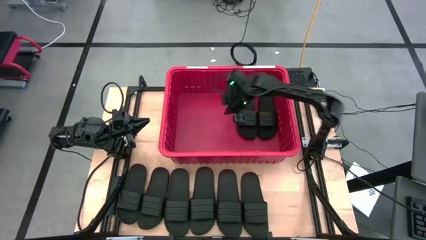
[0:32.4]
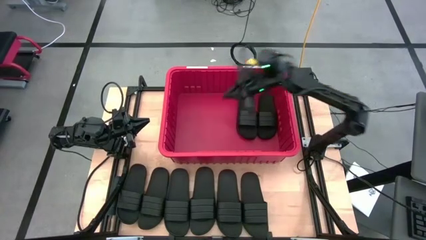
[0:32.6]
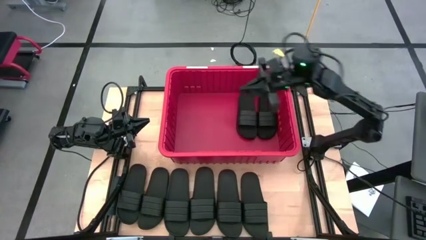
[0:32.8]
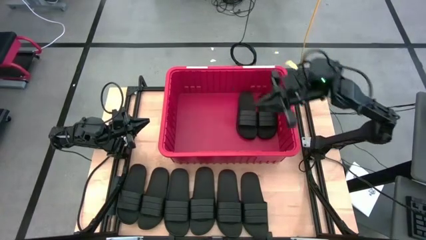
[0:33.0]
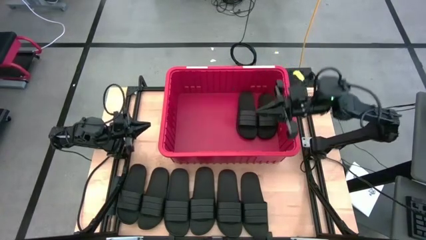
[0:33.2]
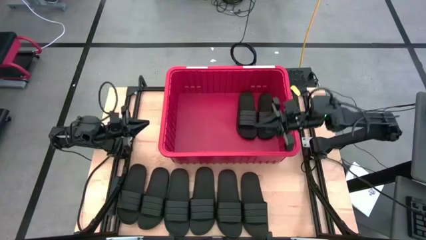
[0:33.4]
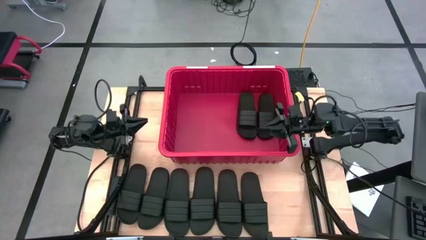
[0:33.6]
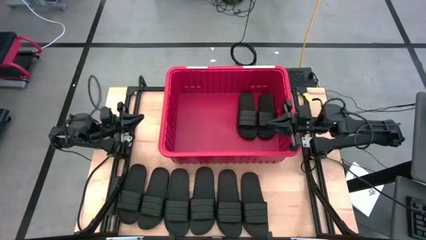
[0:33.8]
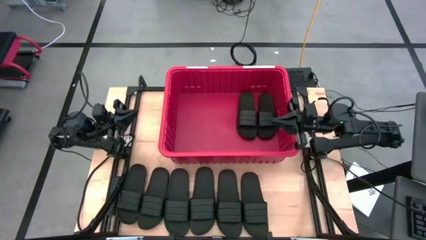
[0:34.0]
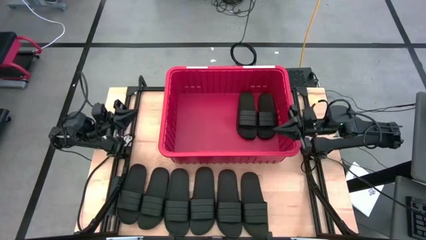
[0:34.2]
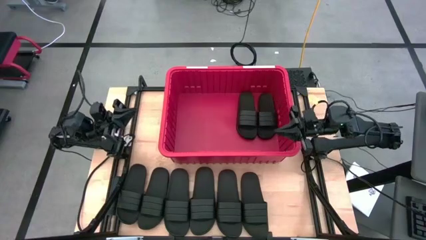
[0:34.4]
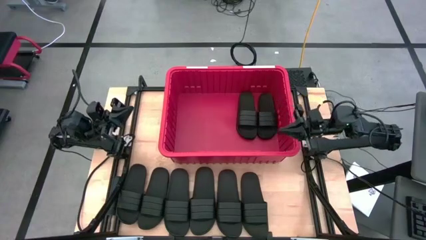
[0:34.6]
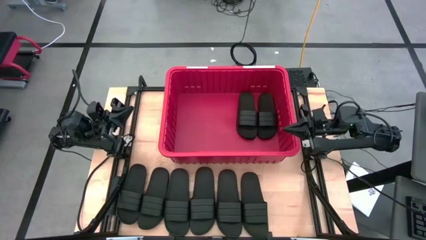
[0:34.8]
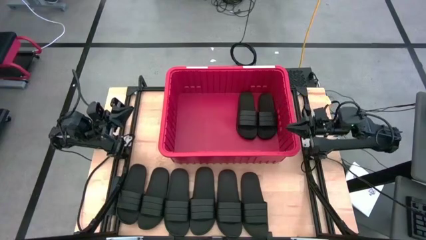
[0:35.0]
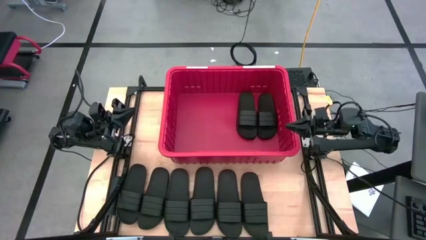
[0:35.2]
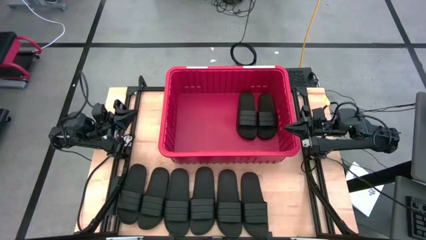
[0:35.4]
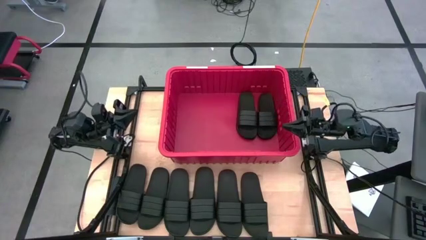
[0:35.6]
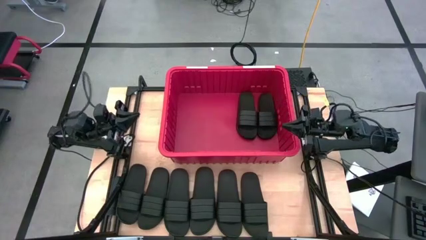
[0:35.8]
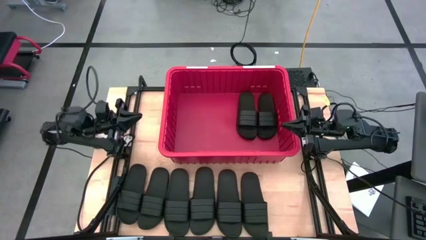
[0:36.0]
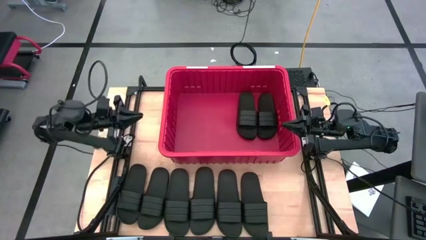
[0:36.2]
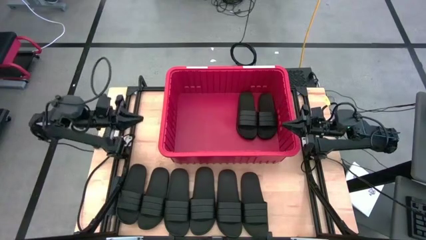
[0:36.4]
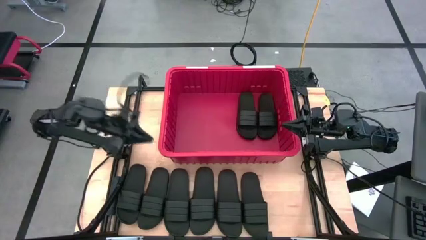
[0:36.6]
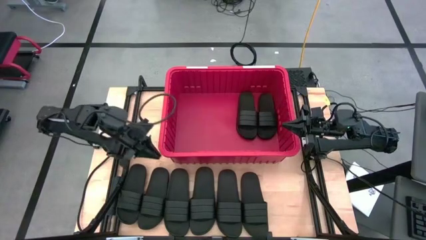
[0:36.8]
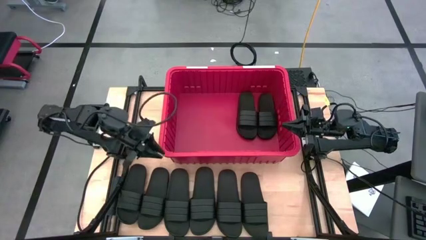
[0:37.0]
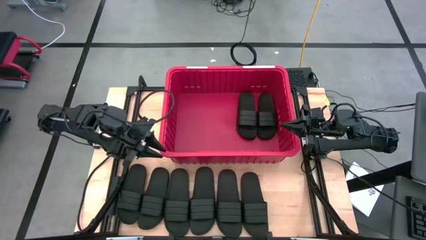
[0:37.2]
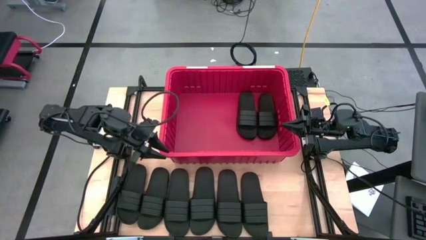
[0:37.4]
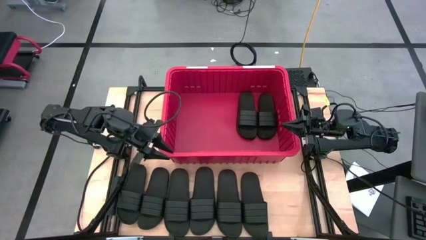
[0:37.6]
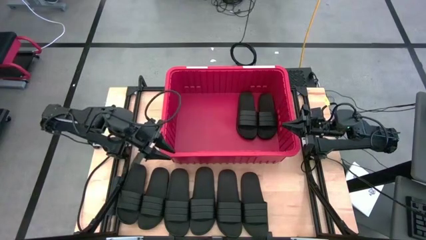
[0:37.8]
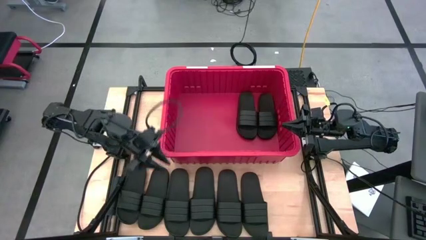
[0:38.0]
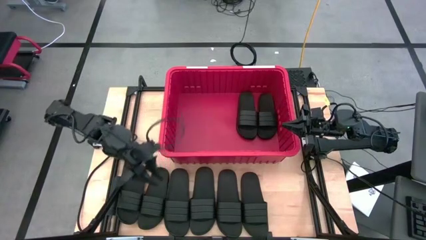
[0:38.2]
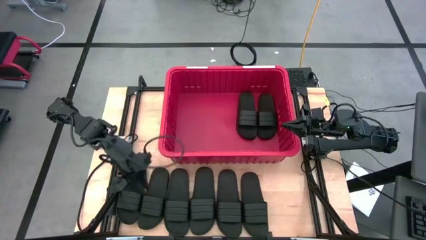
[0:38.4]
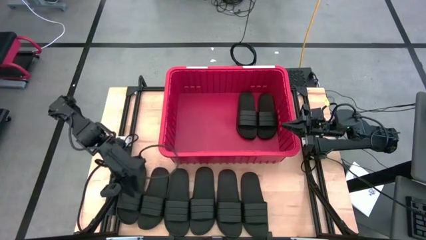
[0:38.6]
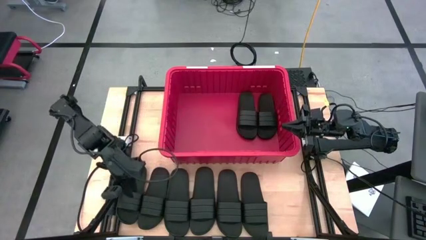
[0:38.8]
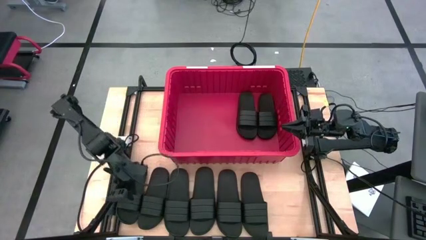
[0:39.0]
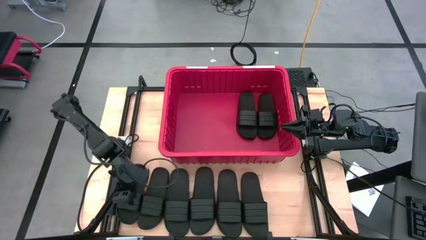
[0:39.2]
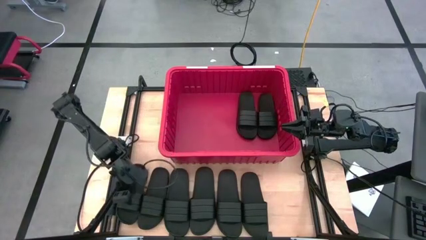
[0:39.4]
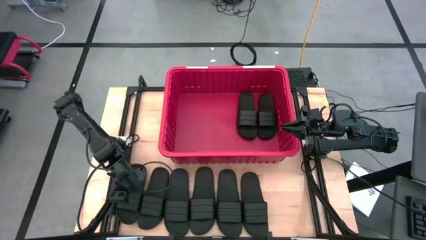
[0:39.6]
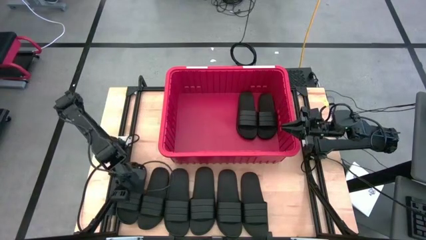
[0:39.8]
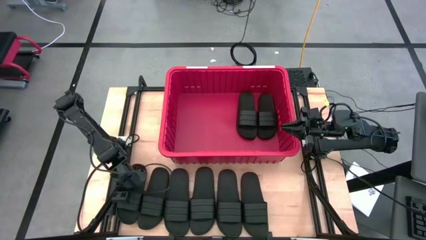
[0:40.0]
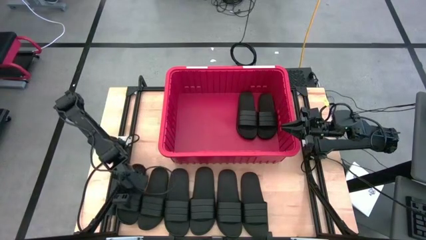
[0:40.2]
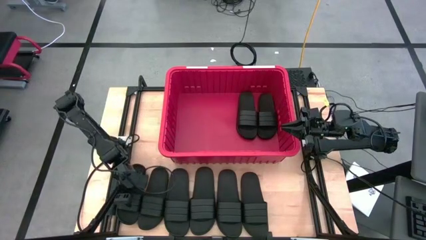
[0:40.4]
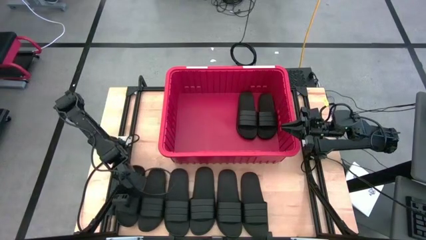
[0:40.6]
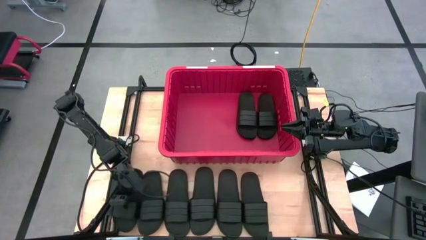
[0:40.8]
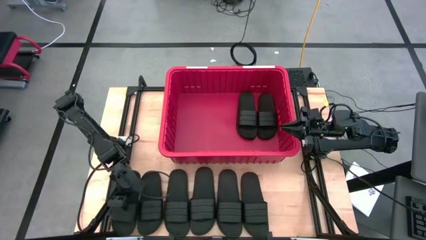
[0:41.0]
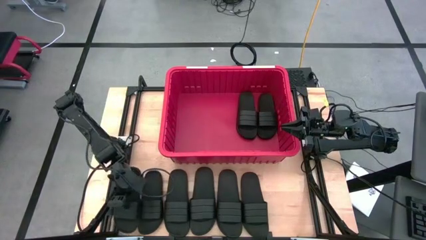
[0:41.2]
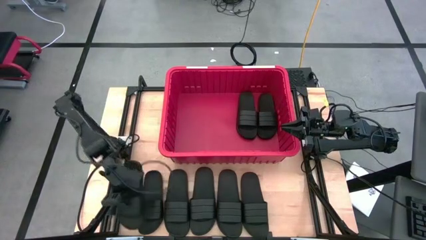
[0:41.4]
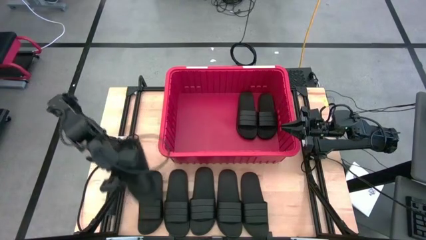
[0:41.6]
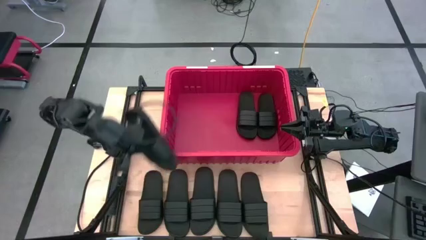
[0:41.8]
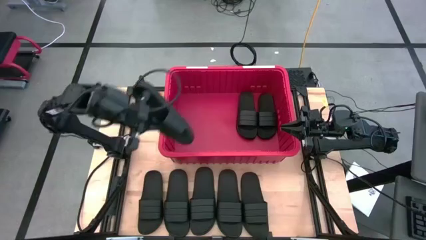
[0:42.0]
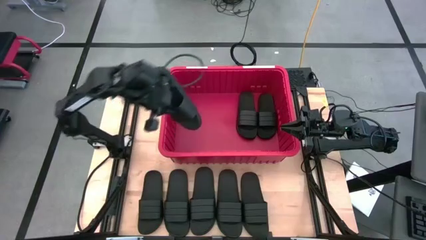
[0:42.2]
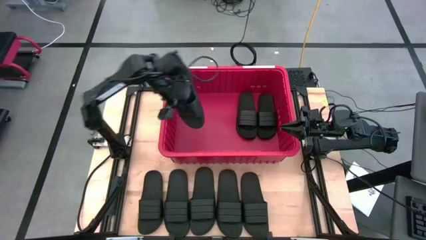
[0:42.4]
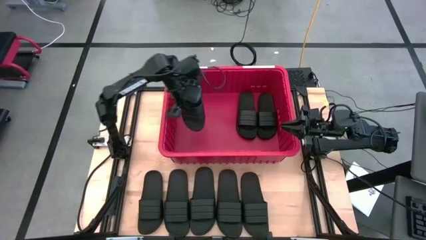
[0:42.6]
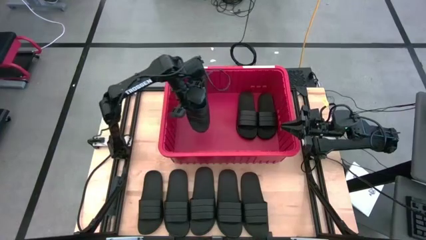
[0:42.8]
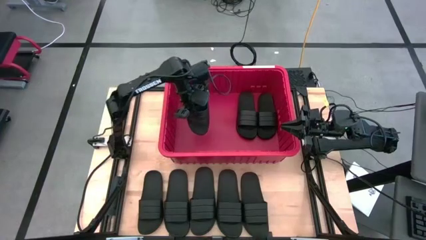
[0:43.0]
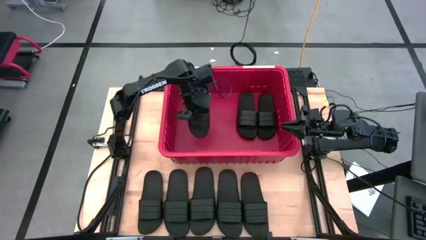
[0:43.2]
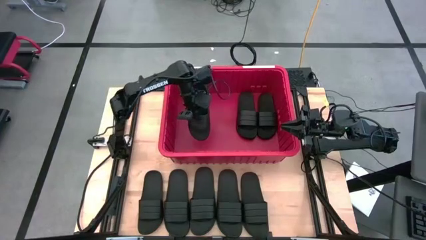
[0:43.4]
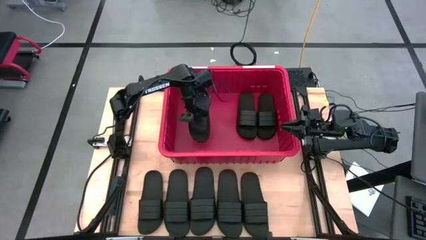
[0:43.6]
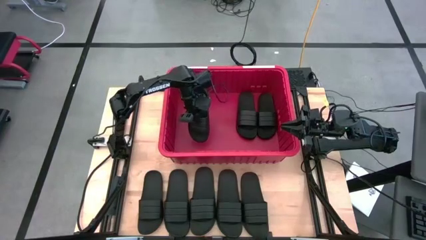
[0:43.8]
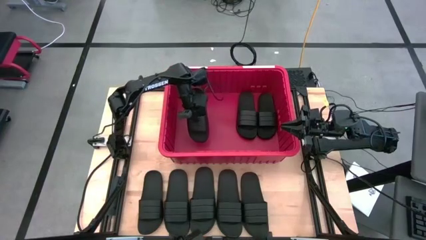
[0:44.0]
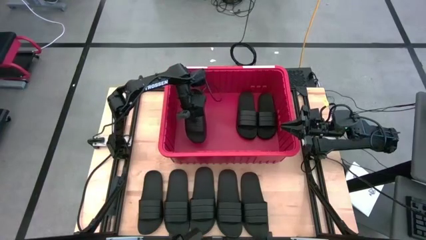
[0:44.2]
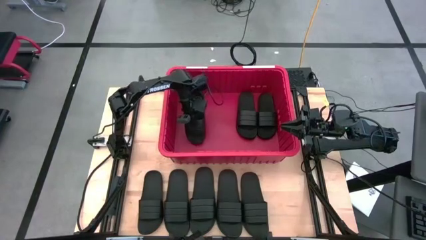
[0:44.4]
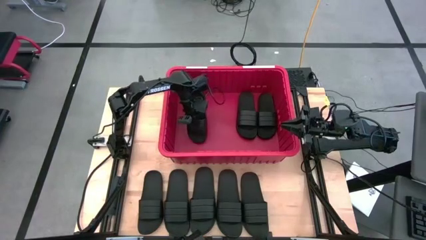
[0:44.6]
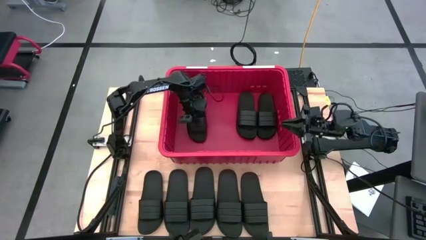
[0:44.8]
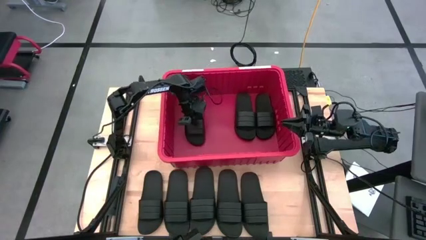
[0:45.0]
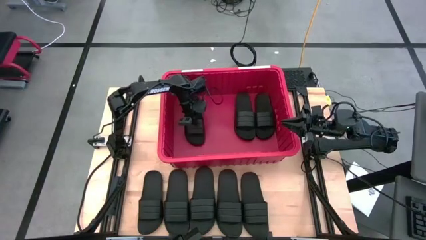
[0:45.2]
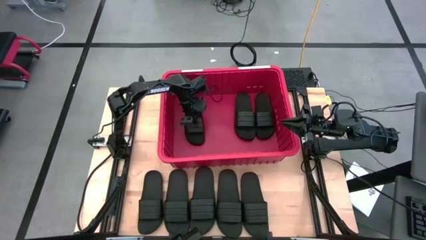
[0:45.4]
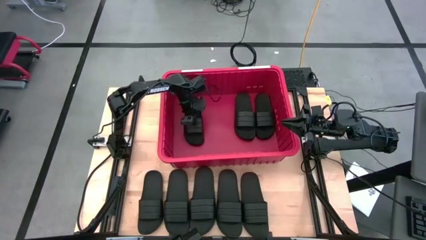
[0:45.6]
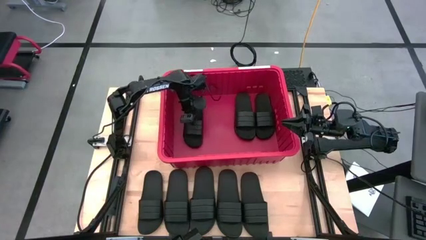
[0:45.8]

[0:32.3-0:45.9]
Task: Pick and place slides into bin
Put the black slides into the red bin

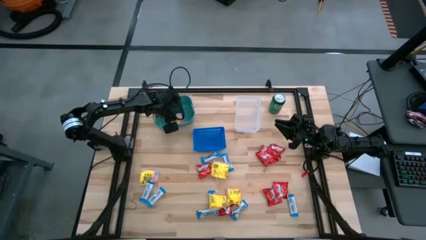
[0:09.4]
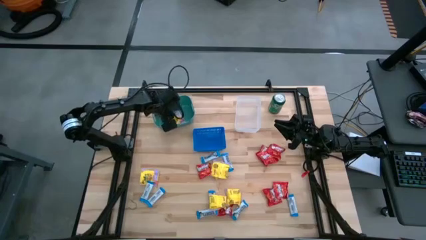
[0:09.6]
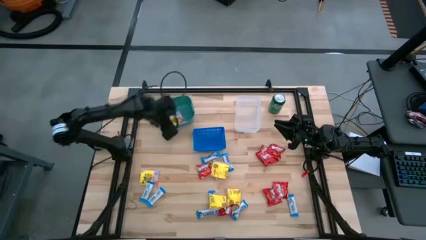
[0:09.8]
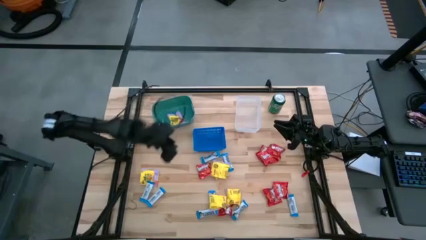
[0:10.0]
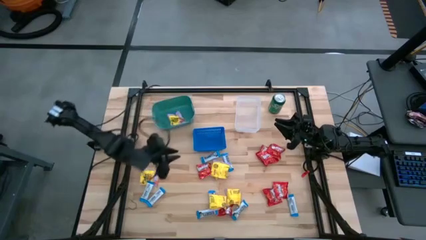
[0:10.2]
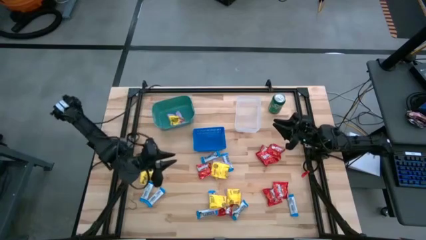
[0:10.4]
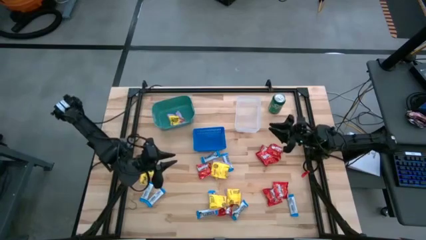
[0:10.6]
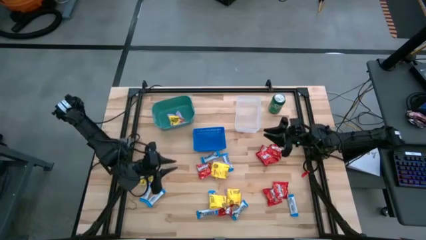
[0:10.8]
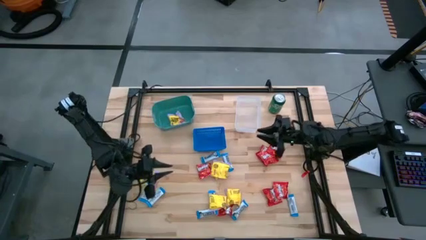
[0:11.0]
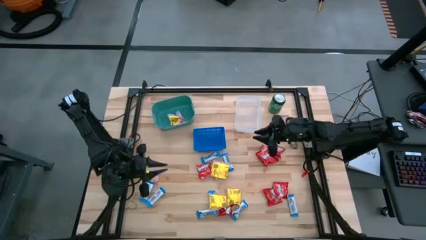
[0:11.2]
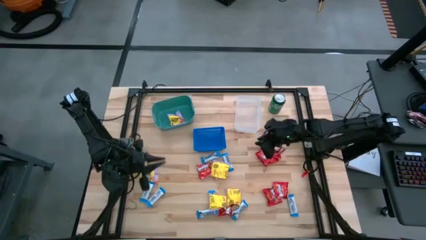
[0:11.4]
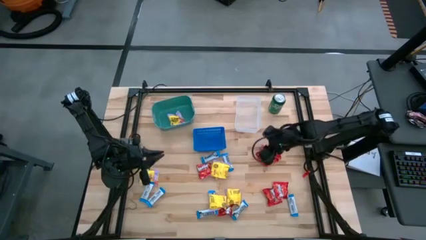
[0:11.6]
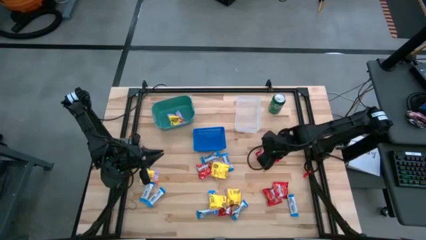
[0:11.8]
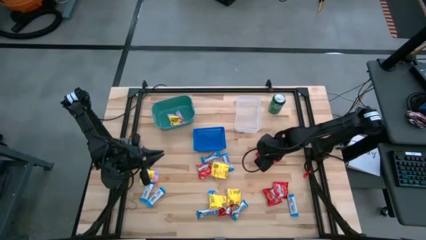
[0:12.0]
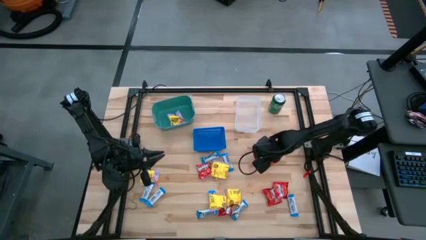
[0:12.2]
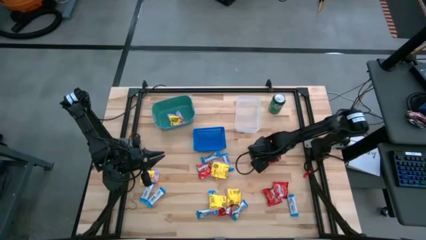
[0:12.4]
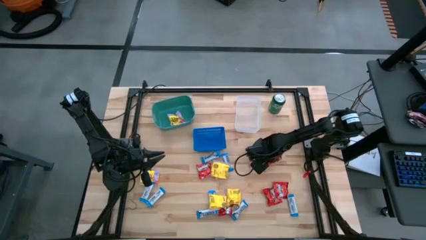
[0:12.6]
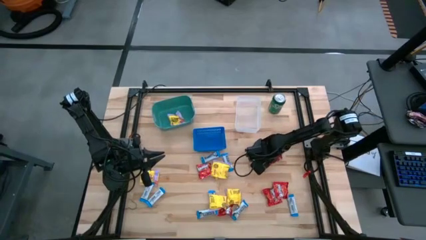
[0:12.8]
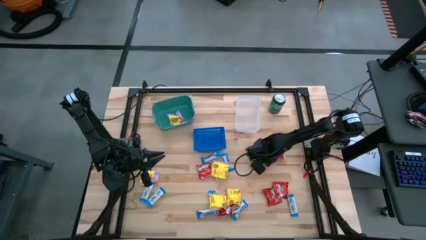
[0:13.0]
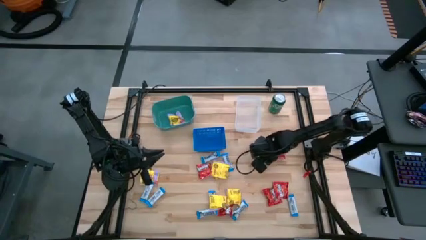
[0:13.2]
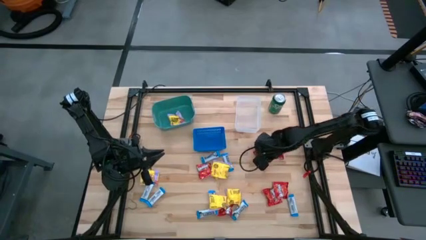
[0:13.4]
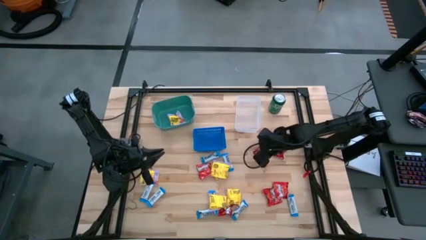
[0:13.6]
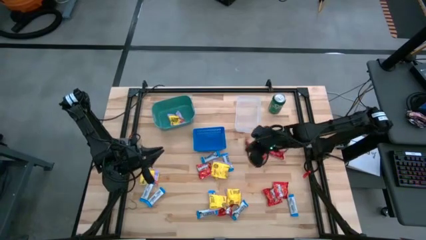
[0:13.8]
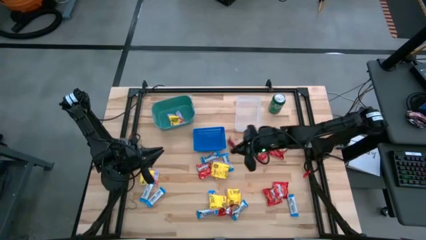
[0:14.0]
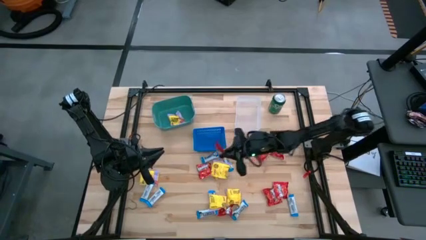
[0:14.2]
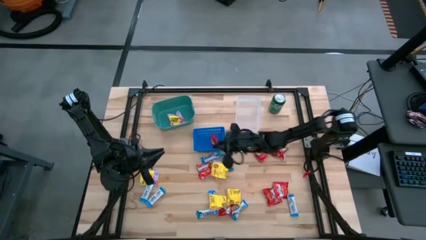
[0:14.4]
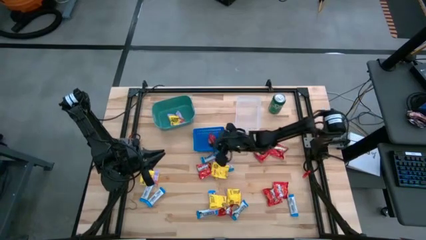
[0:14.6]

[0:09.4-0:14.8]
Task: Sort candy
Put the middle right skittles candy into the blue basket
